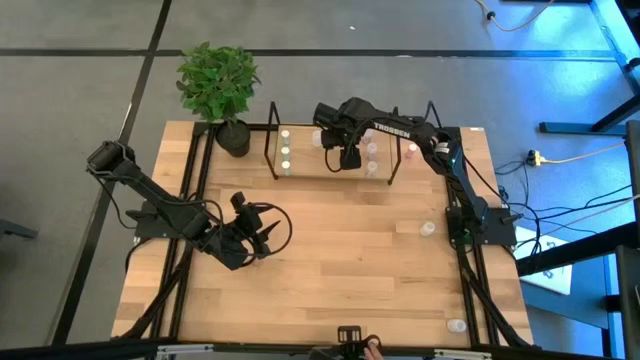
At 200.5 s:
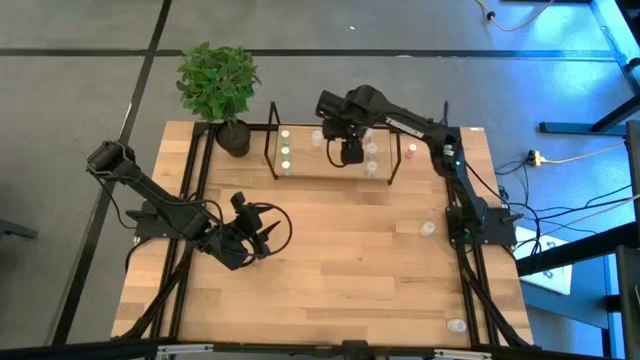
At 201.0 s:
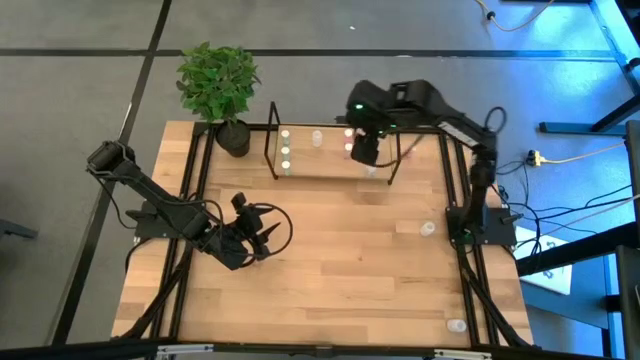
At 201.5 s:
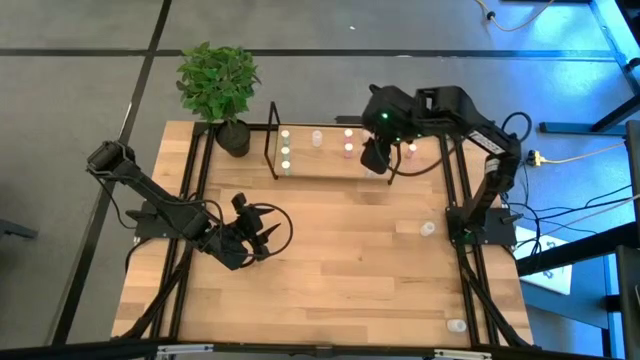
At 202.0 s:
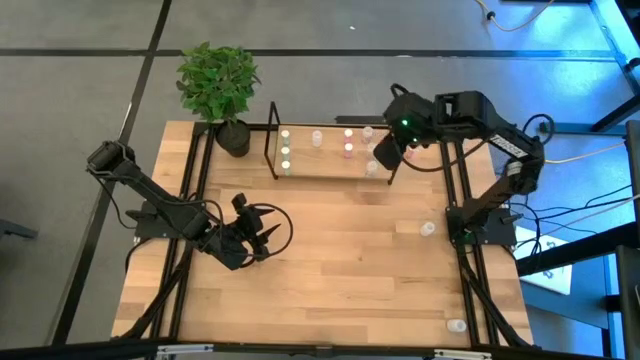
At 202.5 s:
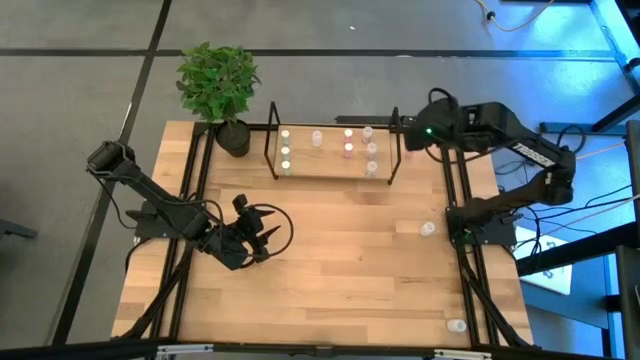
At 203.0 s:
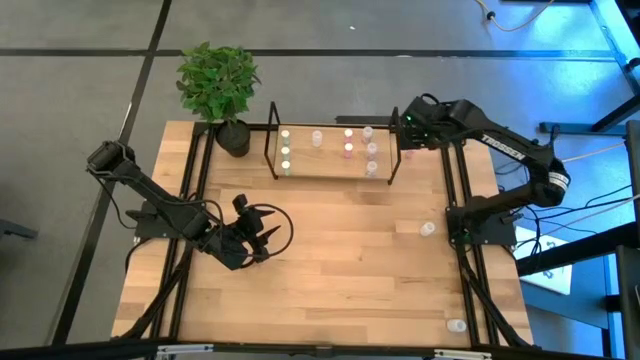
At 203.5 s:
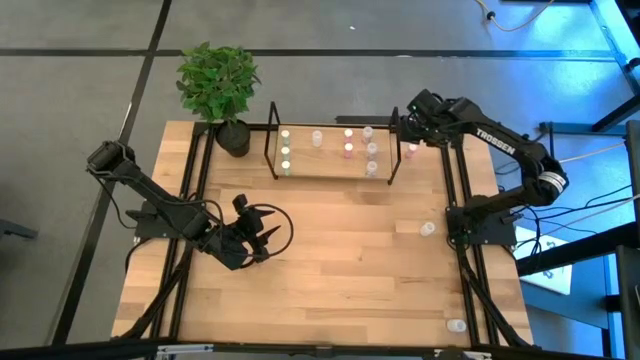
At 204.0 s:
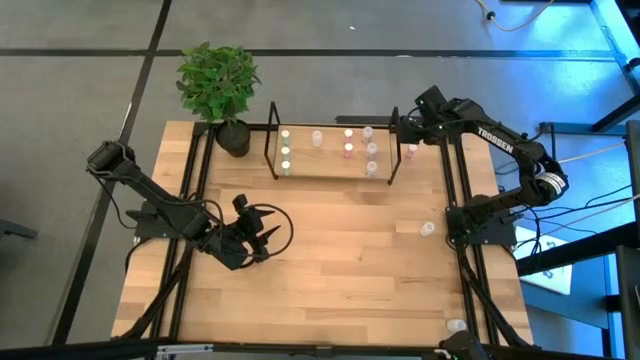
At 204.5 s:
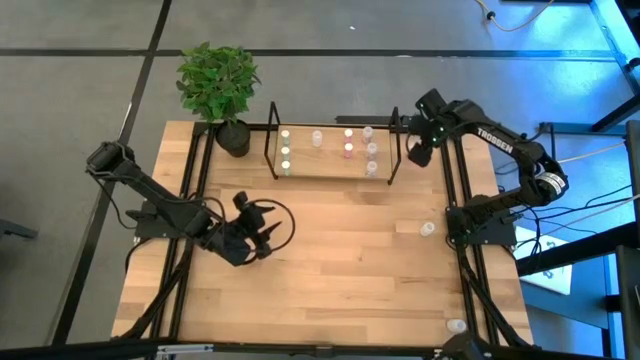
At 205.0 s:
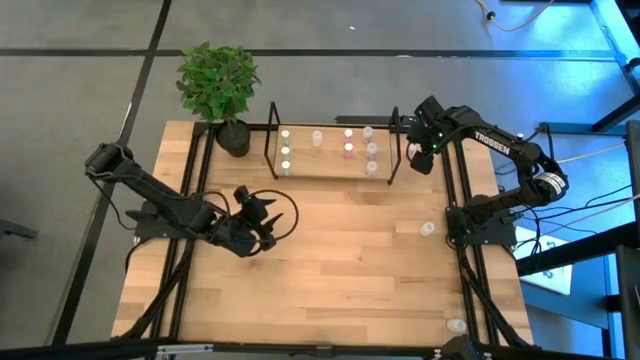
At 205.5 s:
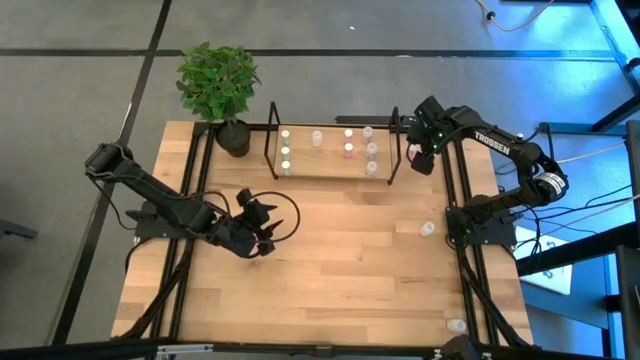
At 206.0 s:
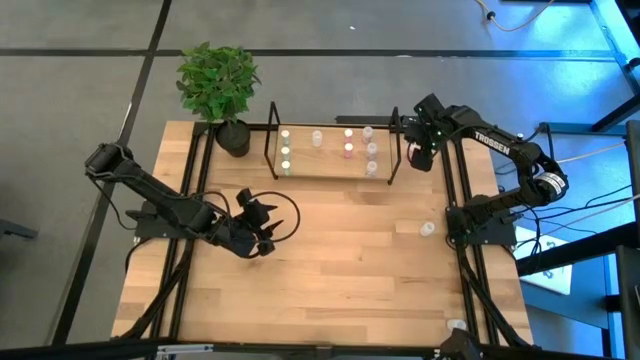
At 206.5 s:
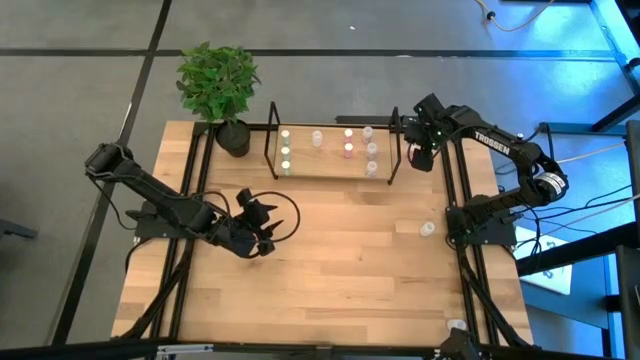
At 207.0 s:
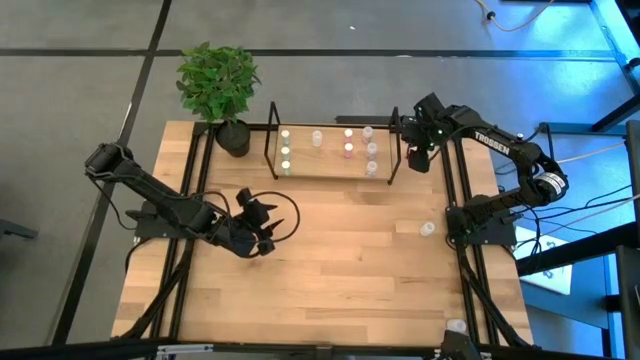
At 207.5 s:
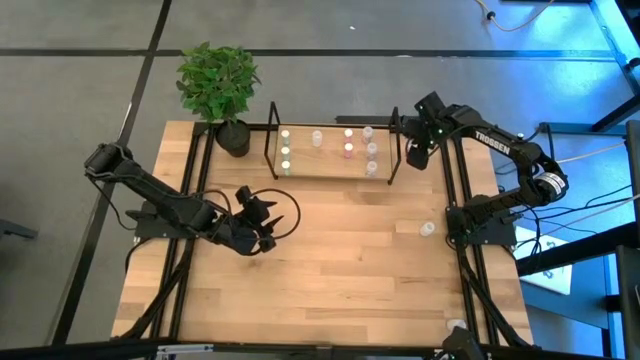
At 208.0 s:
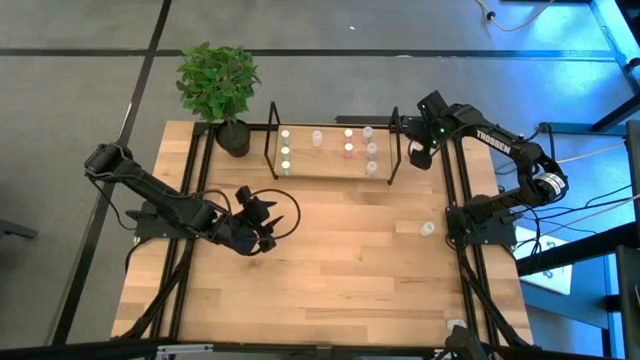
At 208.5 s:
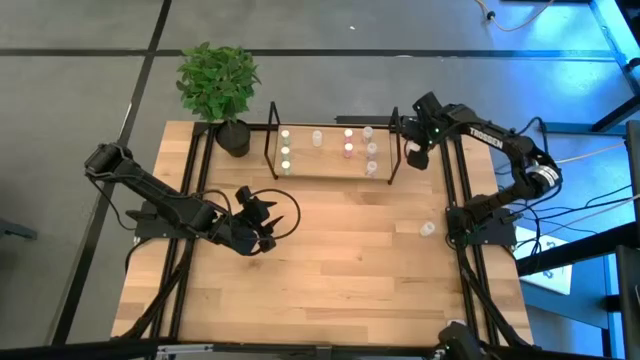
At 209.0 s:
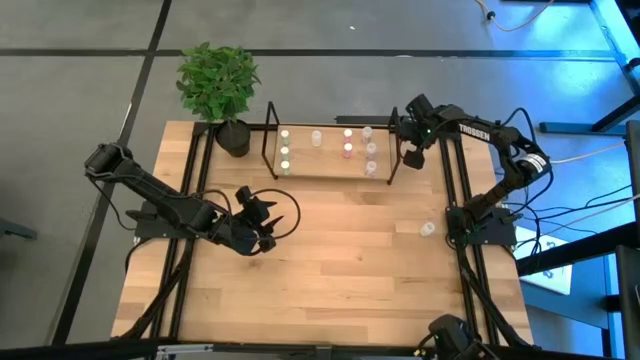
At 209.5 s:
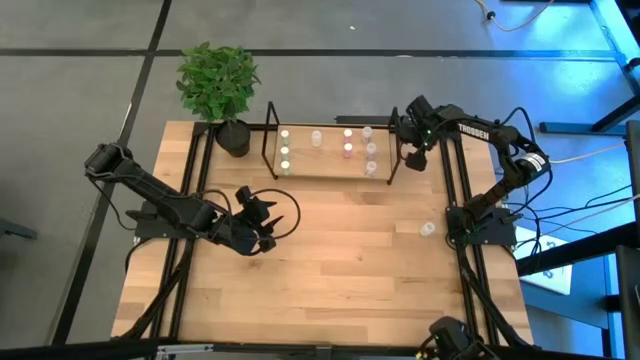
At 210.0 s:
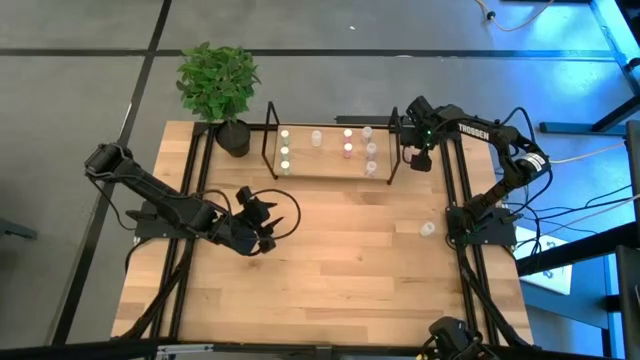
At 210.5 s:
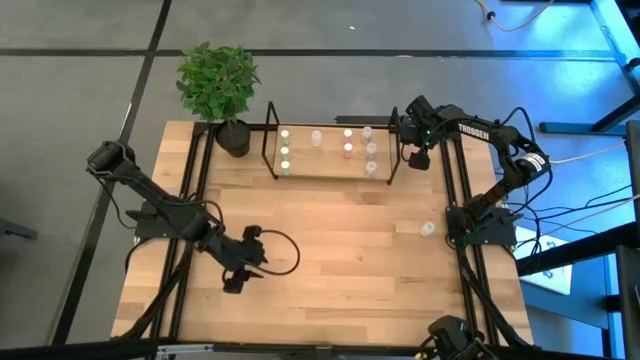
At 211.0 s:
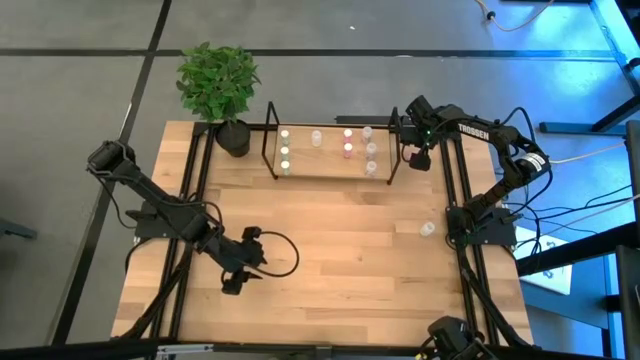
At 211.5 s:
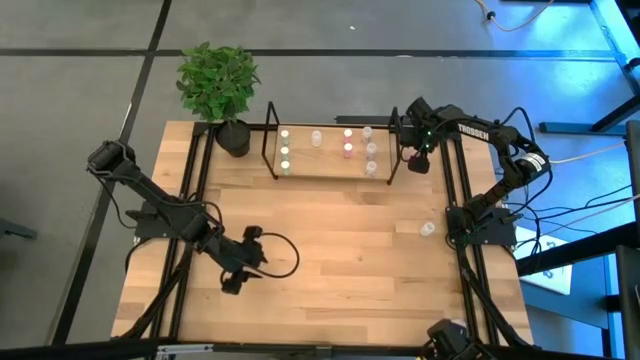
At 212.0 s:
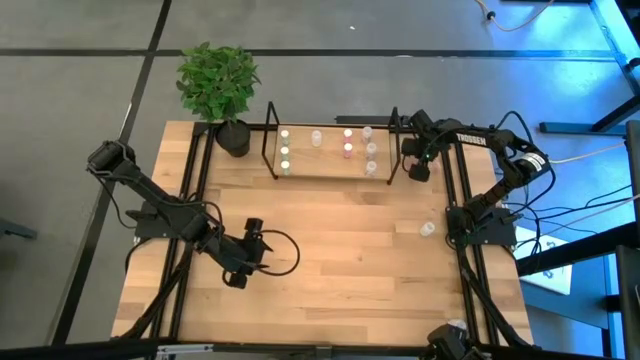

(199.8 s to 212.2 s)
Task: Pick and place medicine bottles onto shelf by color
Put the pink medicine bottle on the shelf aligned with the other pink medicine bottle

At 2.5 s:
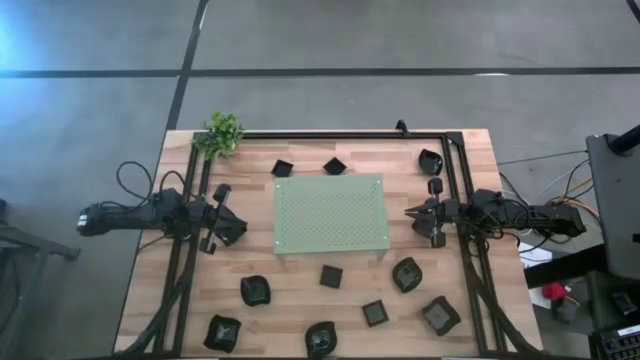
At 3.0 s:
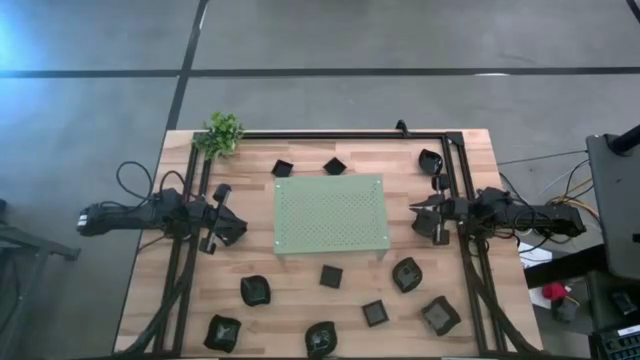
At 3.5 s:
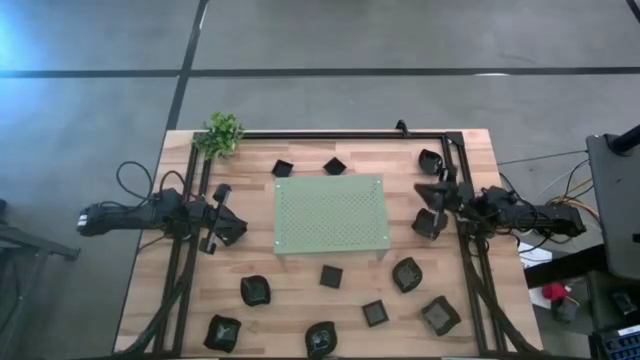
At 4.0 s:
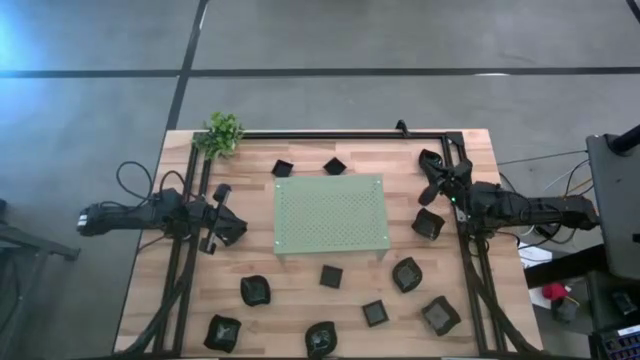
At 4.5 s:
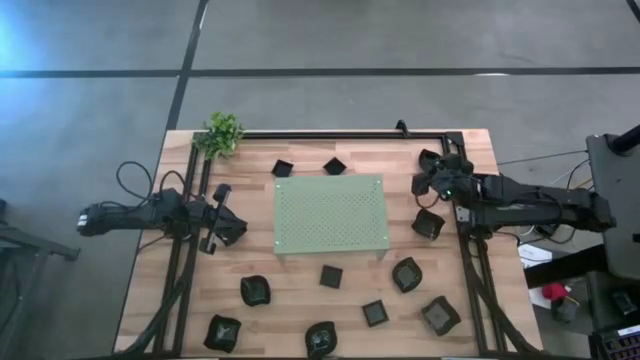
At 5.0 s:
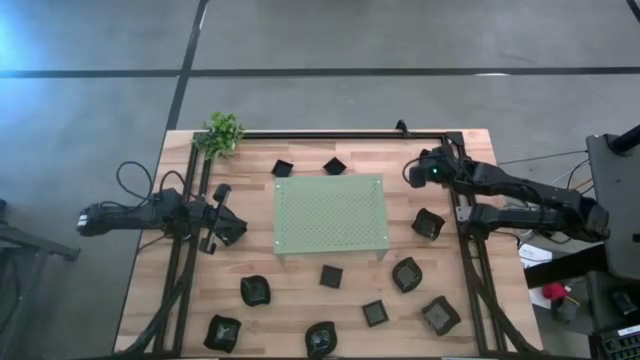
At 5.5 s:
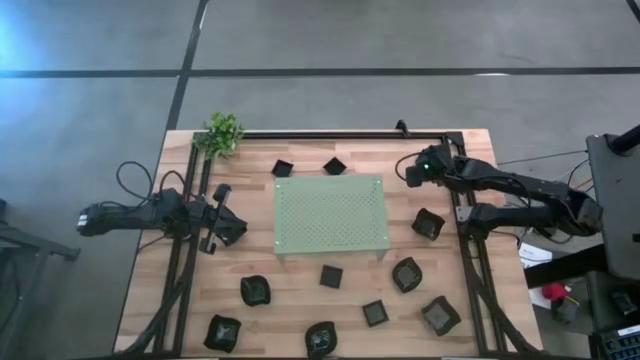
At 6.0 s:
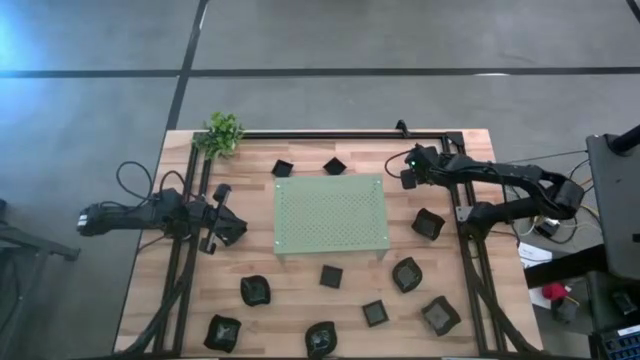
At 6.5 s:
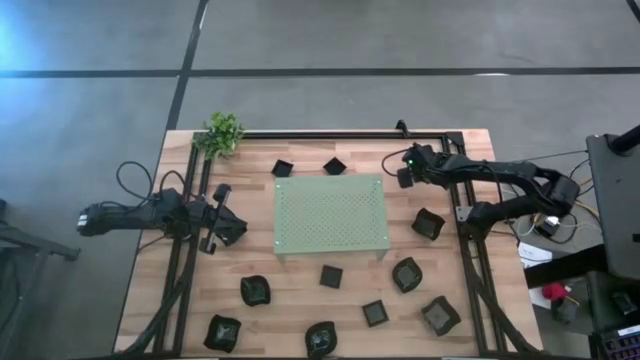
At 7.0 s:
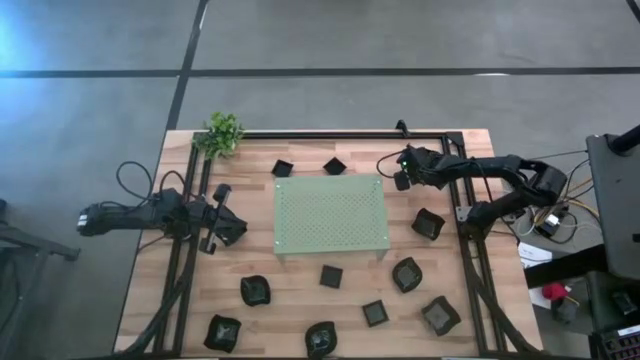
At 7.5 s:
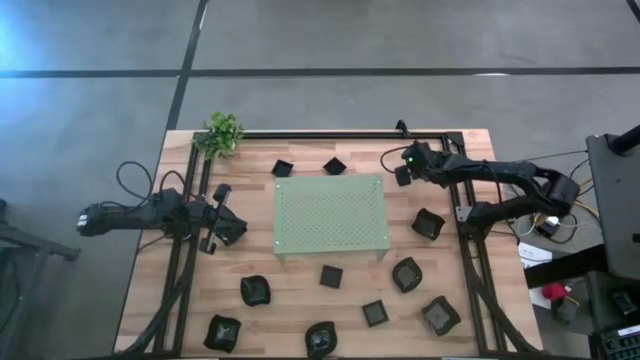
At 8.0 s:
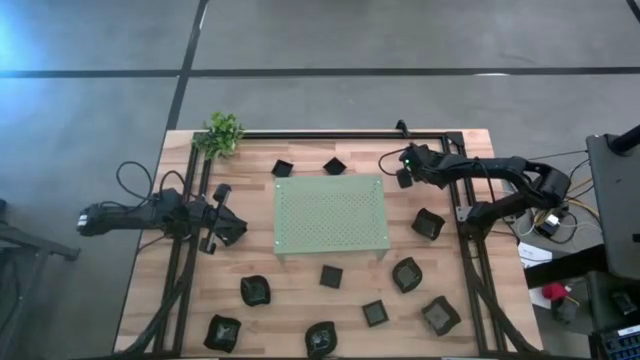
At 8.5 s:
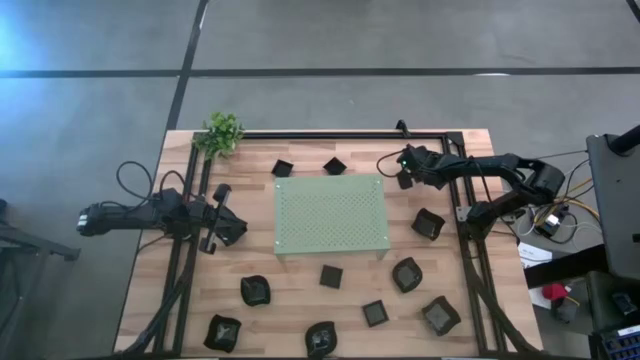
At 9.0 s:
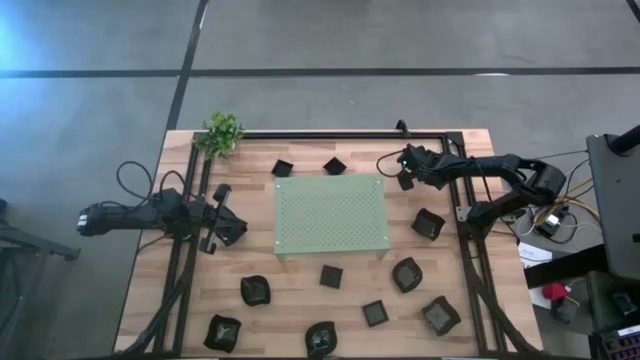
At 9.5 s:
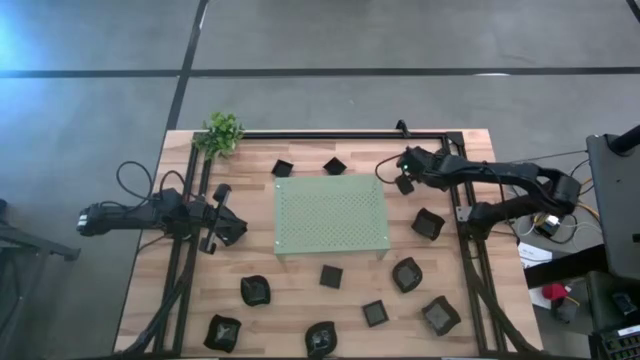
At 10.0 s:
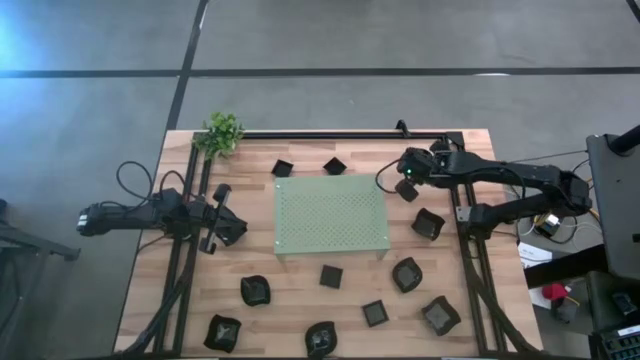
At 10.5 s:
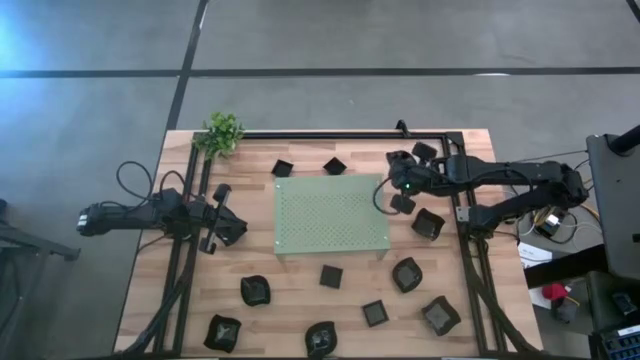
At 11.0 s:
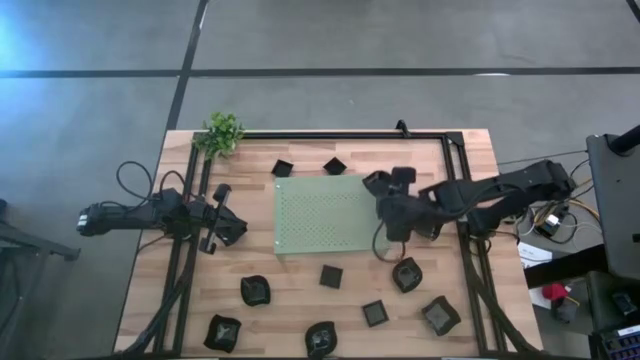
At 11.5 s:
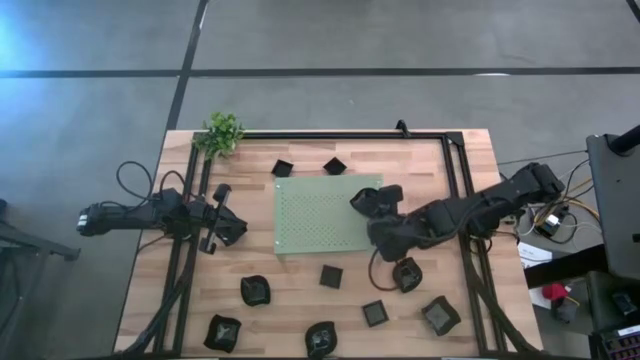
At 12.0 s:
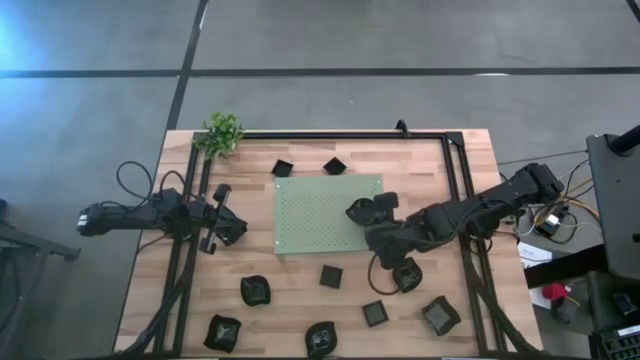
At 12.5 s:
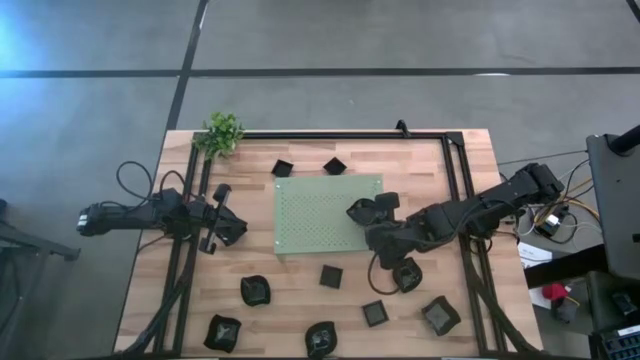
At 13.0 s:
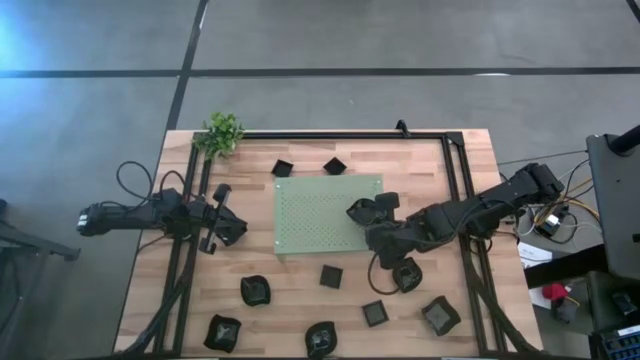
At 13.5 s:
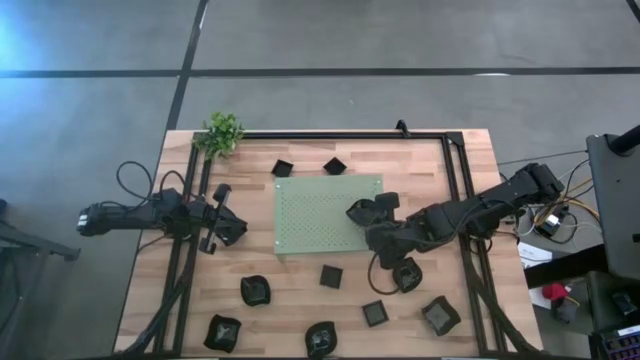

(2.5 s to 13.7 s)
Task: Pick & Place Mini shaped plates
Put the leaf shaped plate on the shelf
